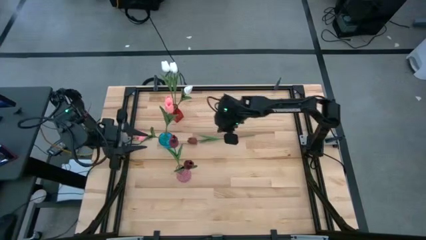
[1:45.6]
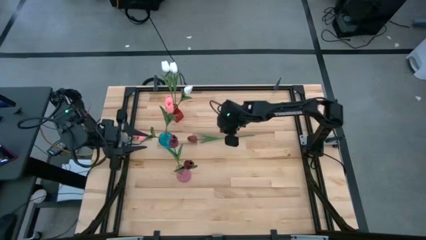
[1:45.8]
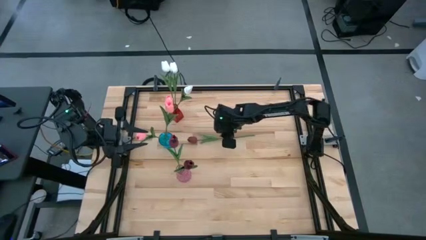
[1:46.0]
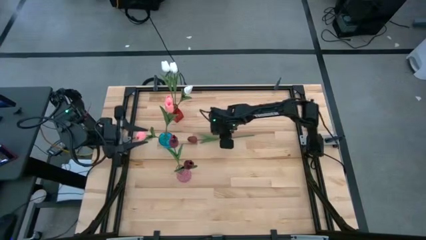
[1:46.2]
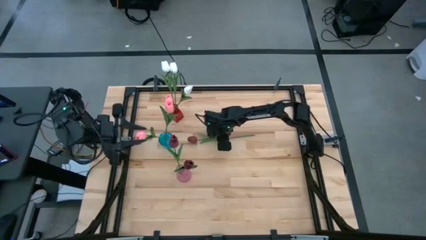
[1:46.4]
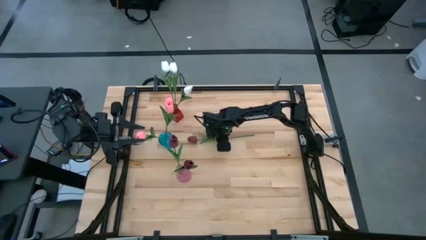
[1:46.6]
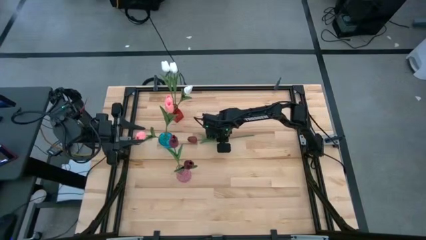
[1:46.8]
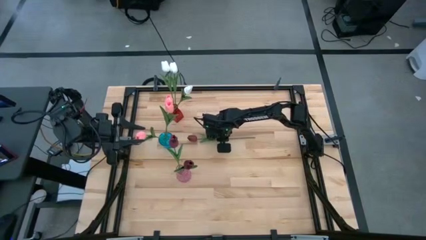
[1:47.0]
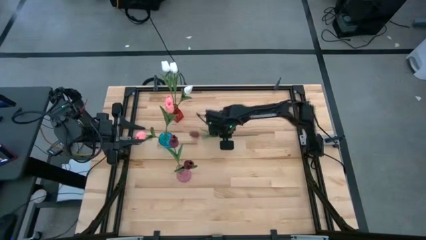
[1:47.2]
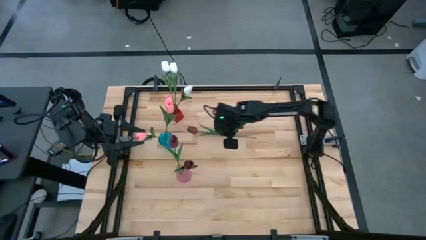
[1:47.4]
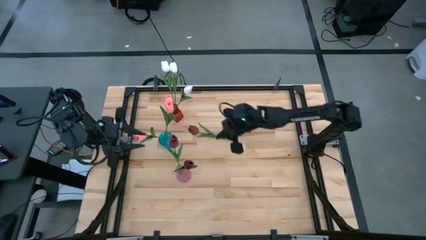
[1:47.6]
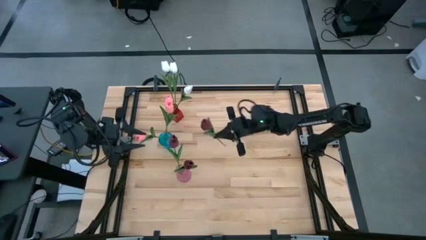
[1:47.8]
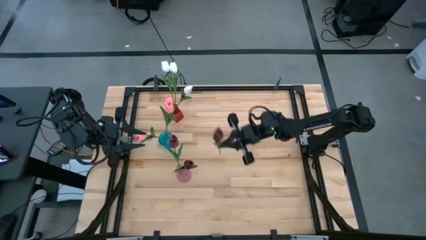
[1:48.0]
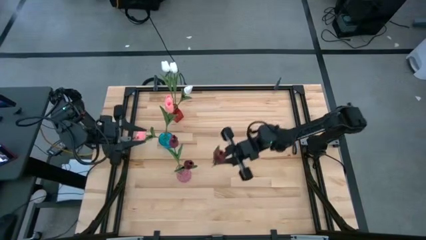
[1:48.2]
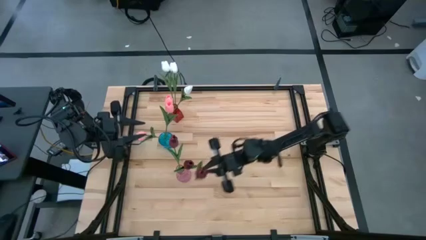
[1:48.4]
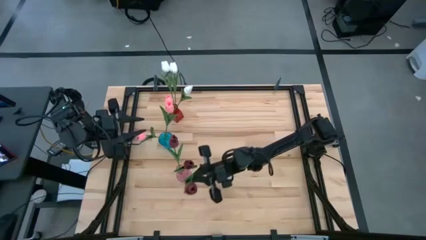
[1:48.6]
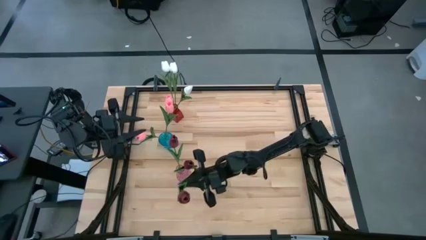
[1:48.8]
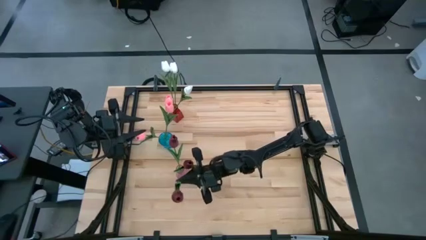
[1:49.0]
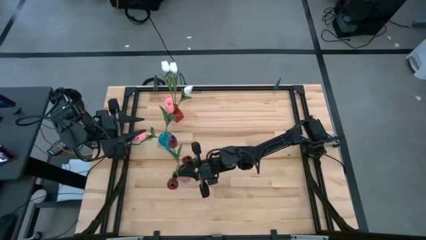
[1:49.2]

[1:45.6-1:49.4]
Task: Sort flowers into vase by color
Put the red flower into the pink vase

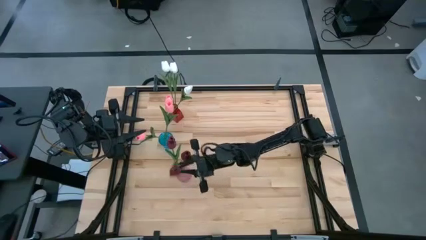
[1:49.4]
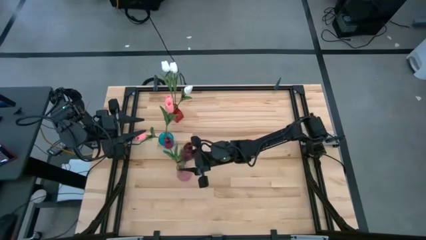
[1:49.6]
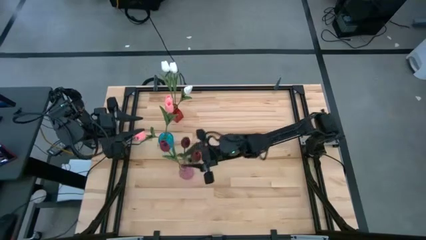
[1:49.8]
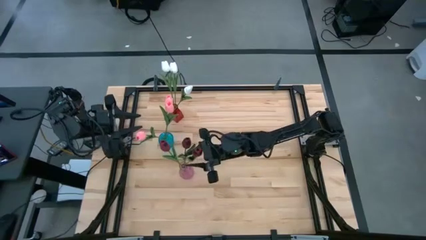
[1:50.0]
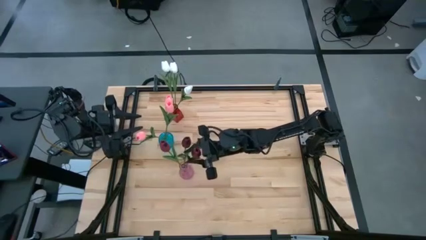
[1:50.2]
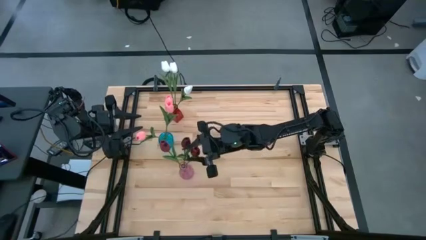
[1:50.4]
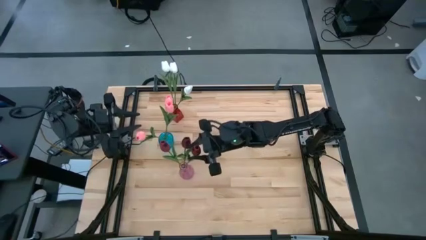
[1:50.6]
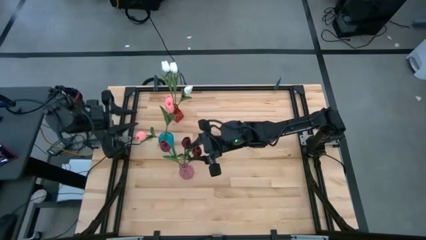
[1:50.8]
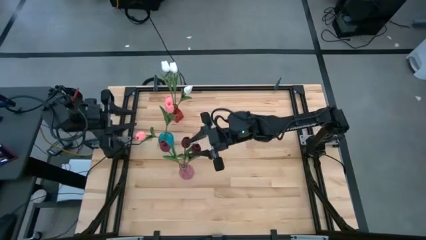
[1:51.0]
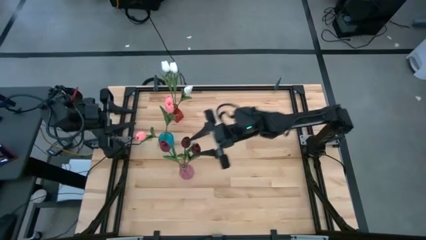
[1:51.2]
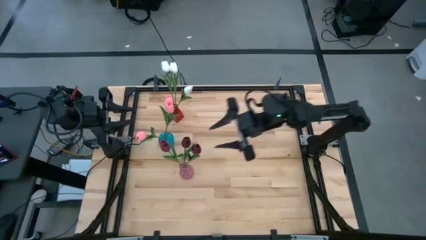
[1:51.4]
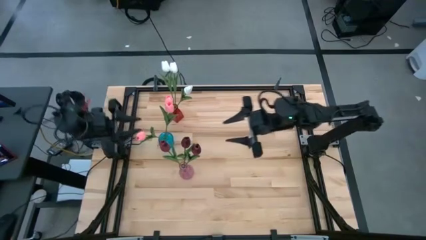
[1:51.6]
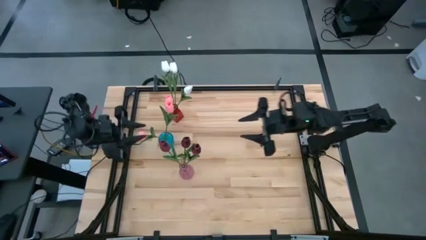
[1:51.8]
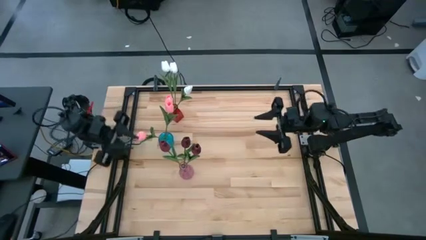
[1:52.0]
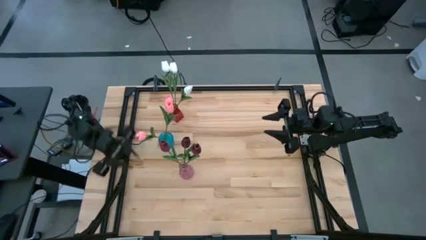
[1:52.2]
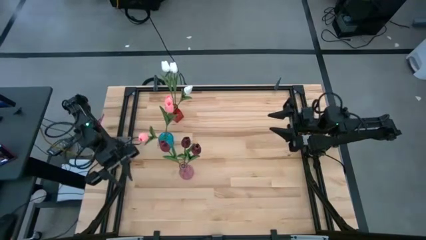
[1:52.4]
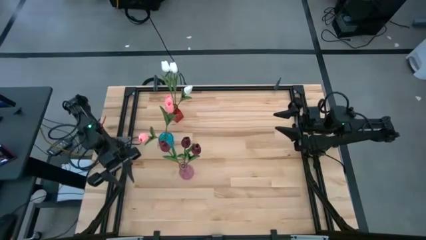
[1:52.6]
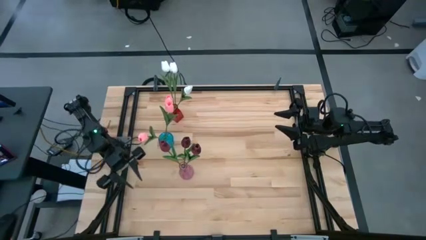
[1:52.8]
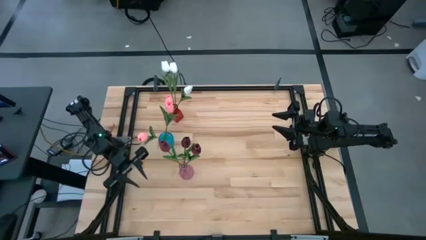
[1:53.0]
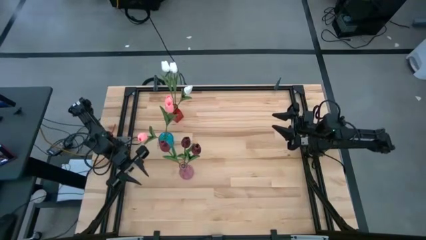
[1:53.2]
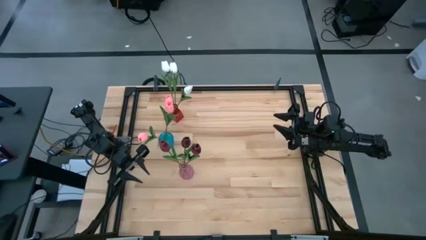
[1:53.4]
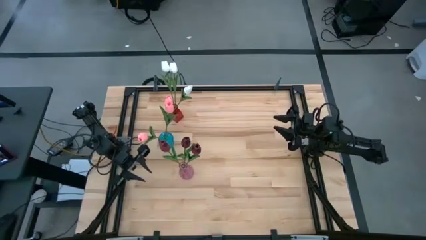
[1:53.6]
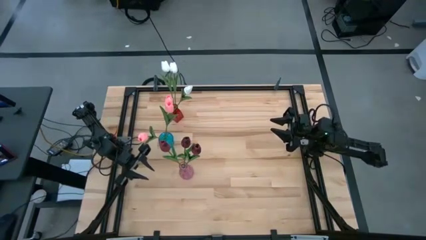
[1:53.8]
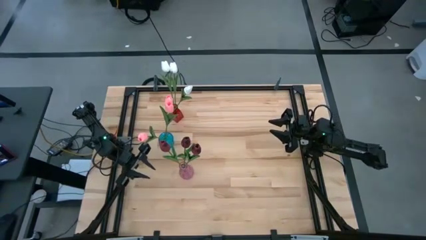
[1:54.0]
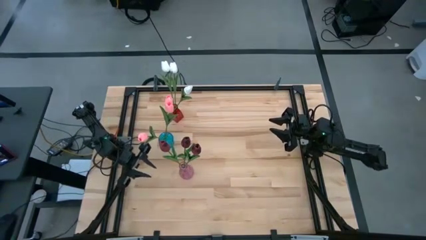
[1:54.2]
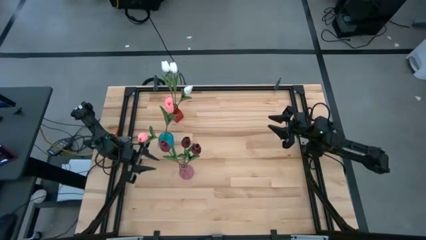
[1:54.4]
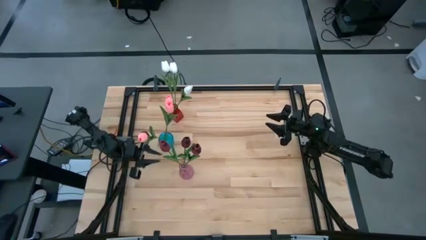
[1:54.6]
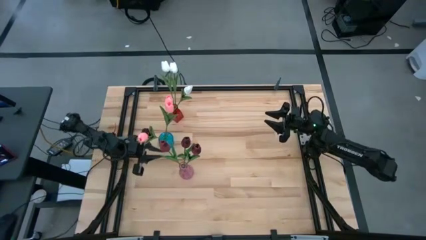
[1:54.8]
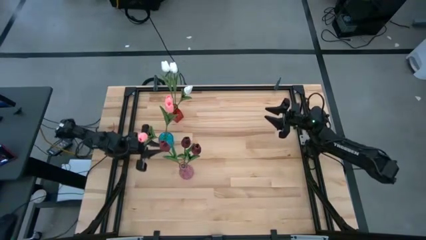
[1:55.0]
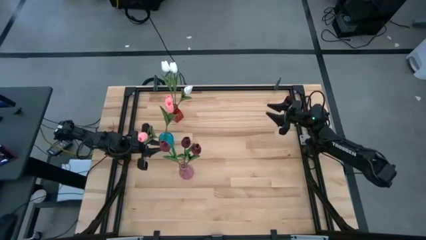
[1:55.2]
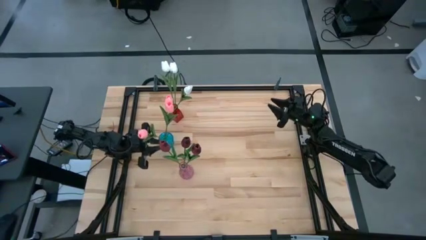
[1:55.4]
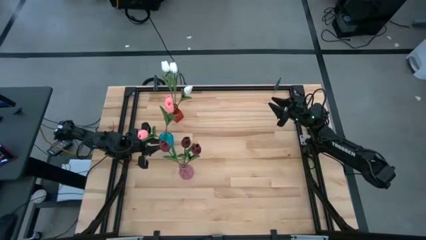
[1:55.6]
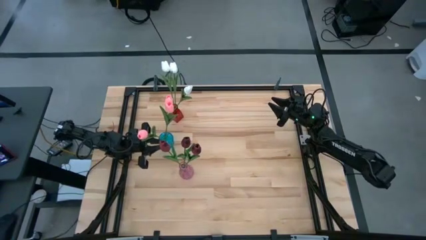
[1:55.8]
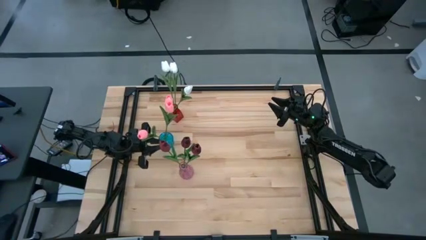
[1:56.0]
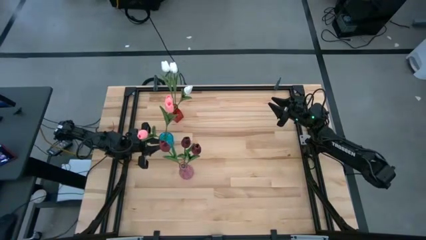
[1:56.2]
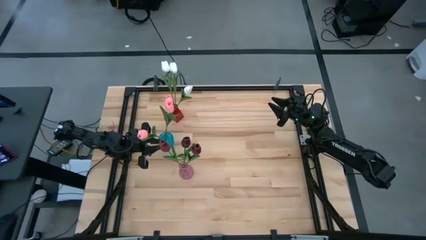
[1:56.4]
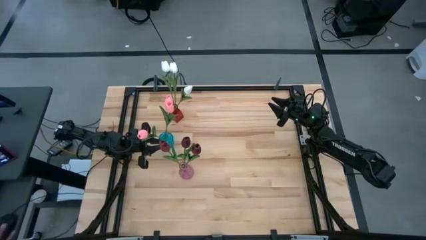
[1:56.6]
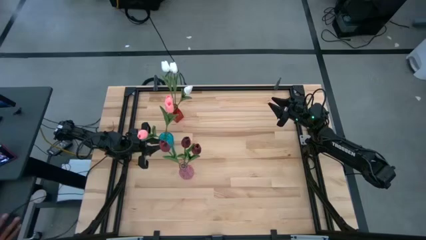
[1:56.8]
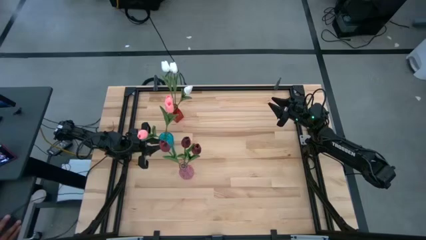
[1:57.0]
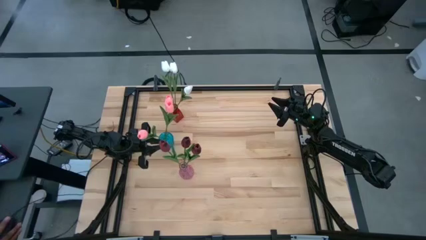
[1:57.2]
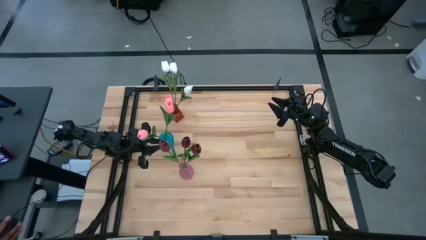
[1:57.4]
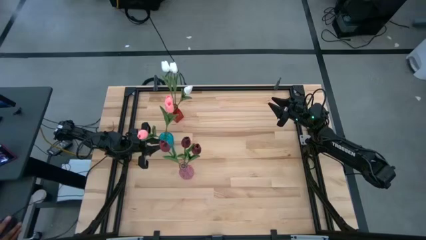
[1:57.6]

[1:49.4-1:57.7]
Return to Home Position

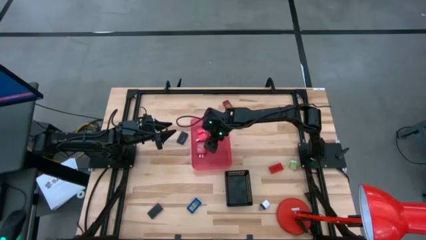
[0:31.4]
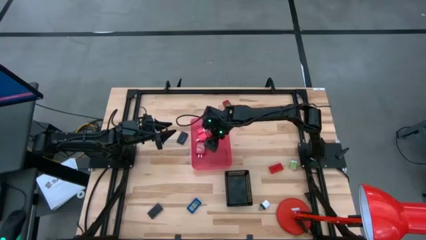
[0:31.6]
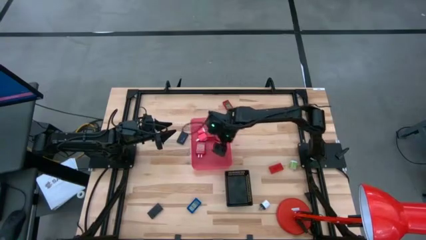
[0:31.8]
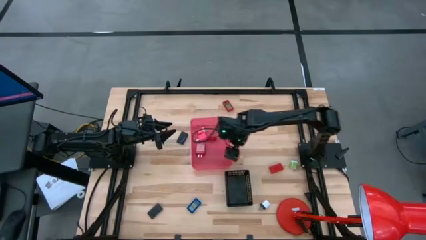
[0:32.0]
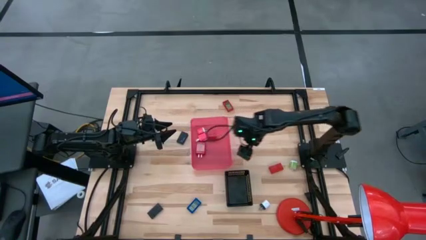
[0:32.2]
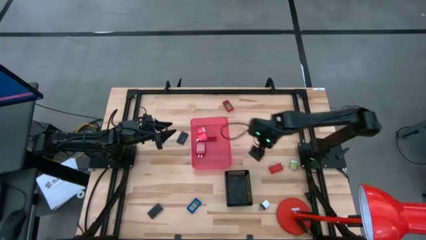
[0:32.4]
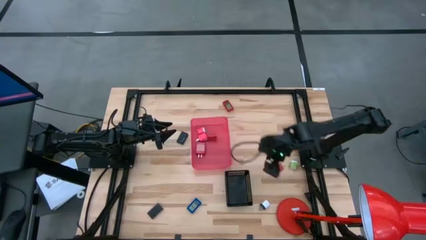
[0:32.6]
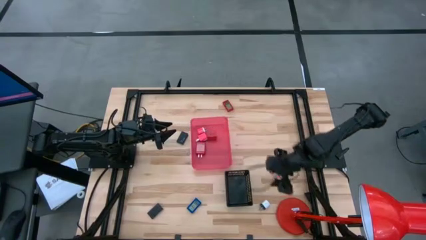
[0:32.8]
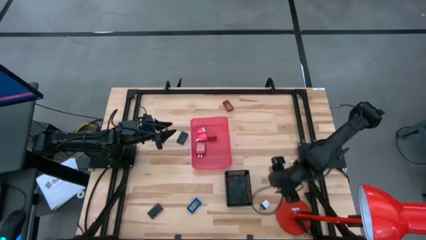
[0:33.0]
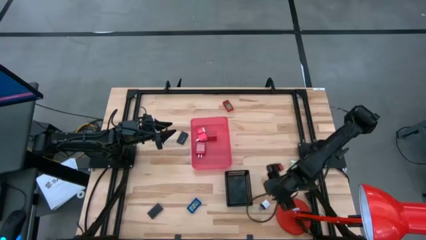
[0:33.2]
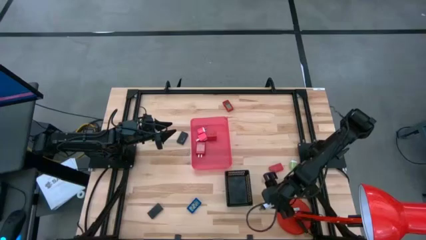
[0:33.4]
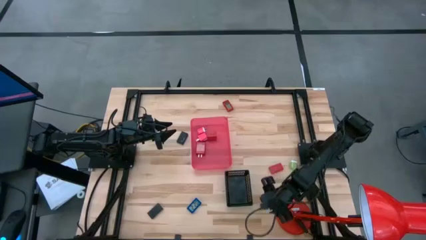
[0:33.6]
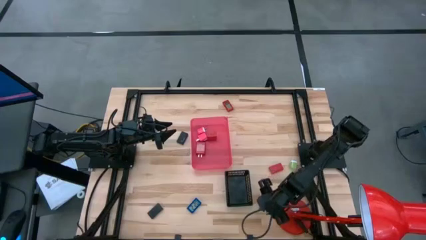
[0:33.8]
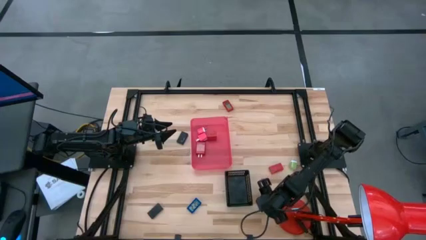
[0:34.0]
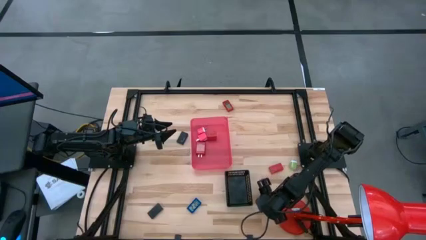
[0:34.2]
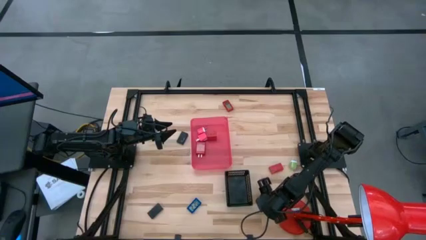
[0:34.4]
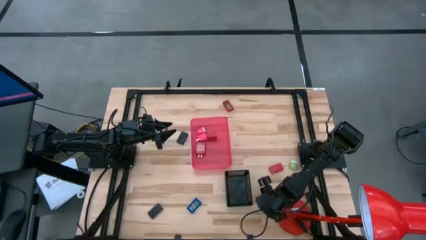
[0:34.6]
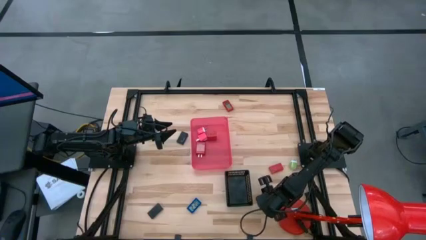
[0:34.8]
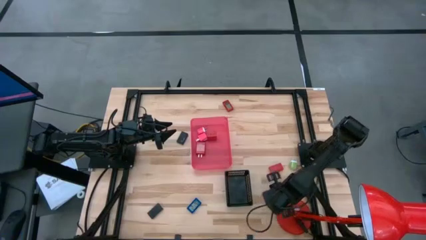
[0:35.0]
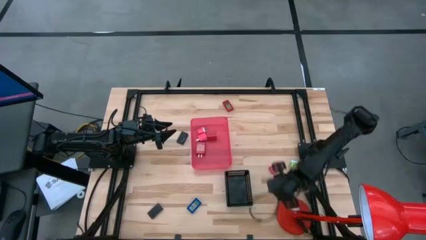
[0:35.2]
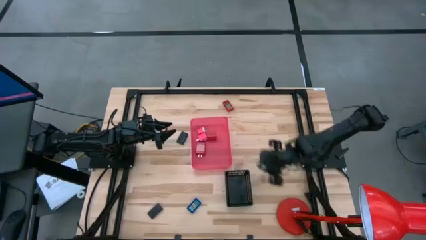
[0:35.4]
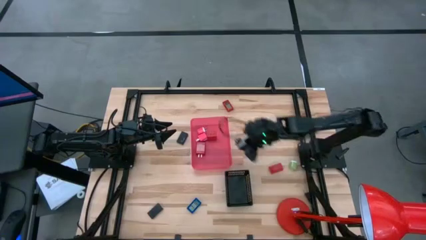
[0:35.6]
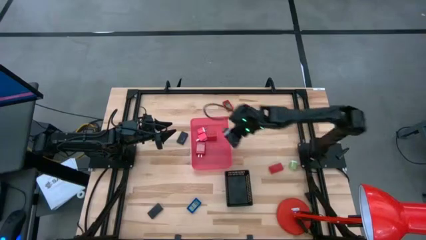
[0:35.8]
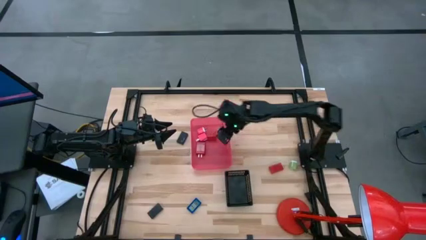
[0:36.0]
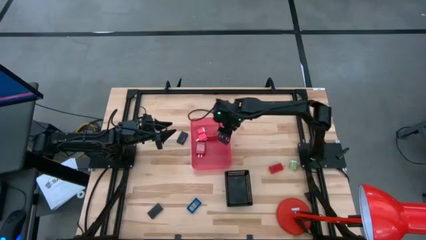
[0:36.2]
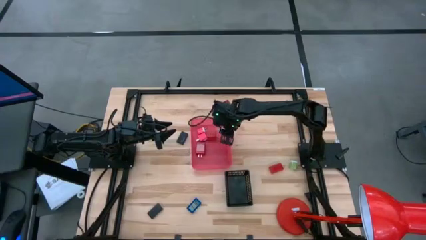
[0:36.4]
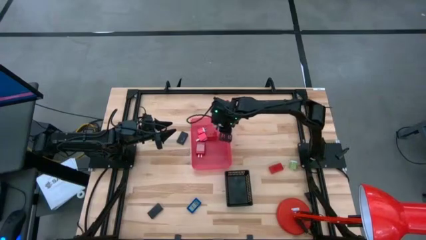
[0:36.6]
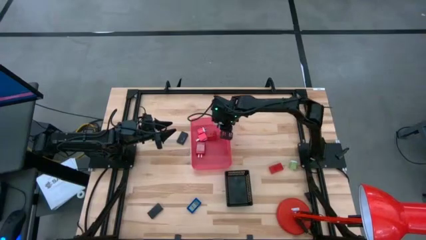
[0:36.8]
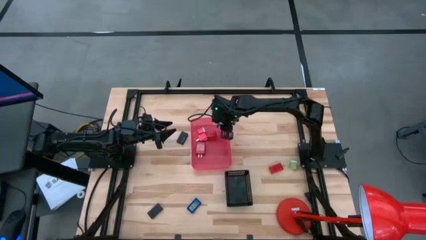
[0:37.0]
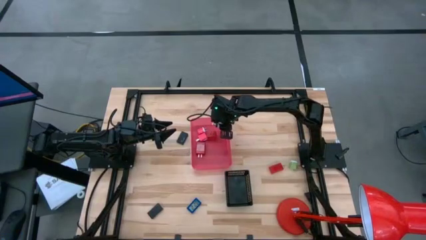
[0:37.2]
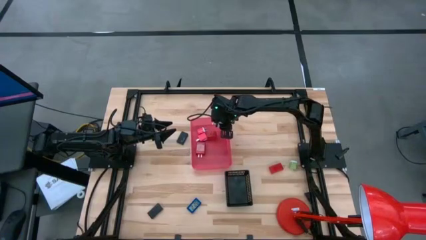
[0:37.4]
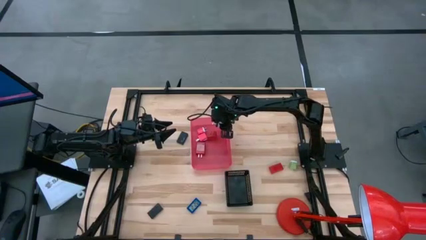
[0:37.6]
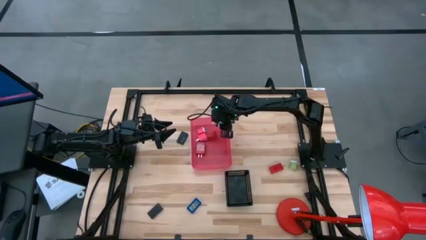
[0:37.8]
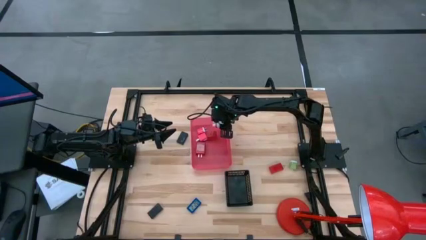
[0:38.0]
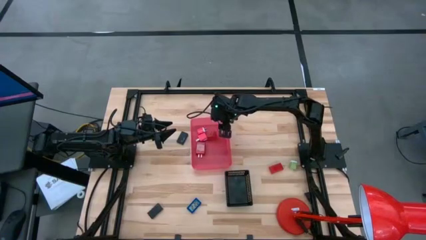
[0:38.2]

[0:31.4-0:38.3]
Task: Pick & Place Office items
Put the white charger adapter into the pink bin
